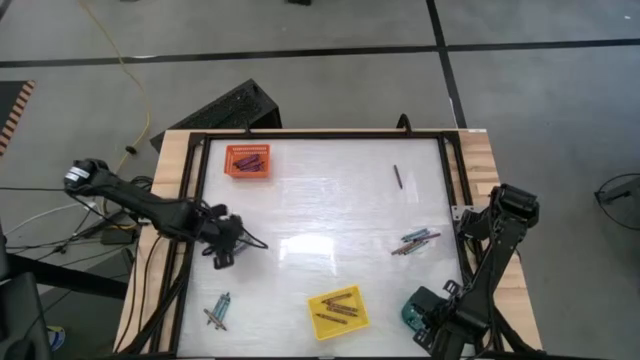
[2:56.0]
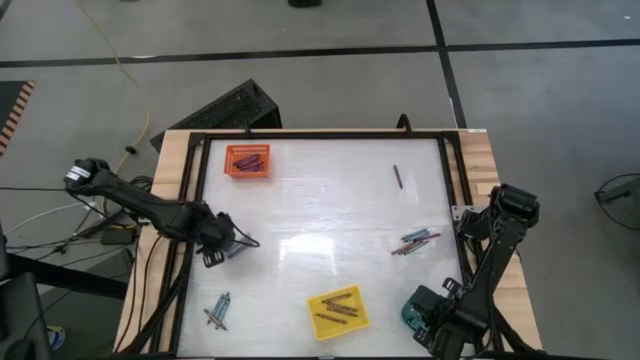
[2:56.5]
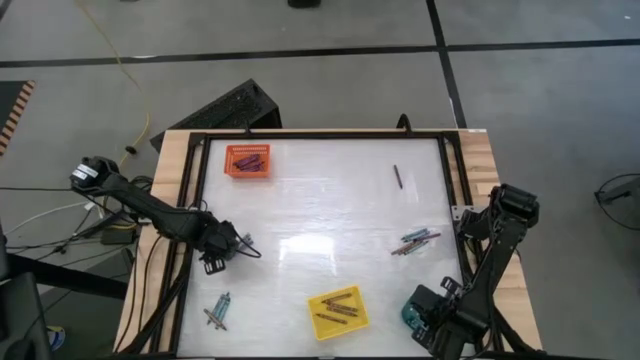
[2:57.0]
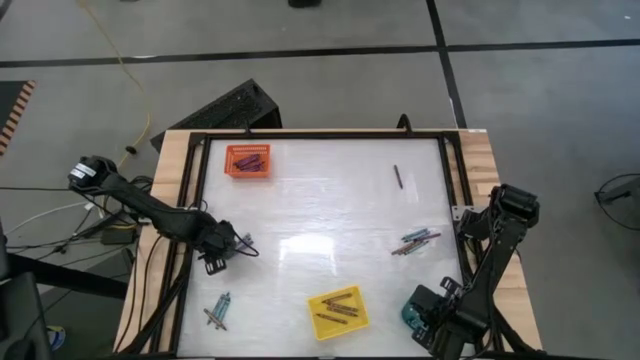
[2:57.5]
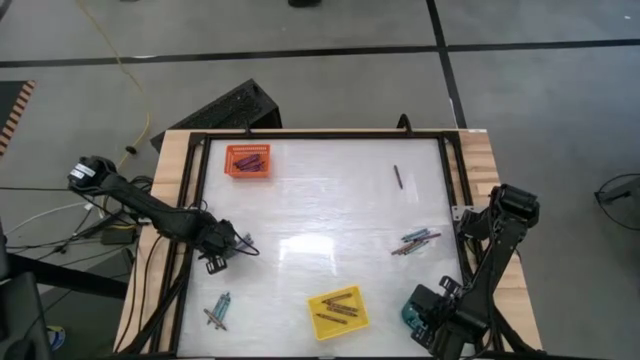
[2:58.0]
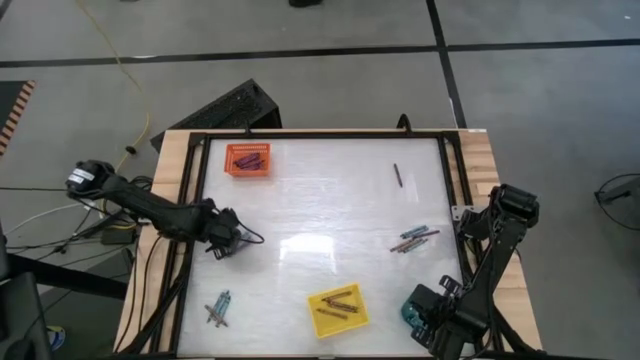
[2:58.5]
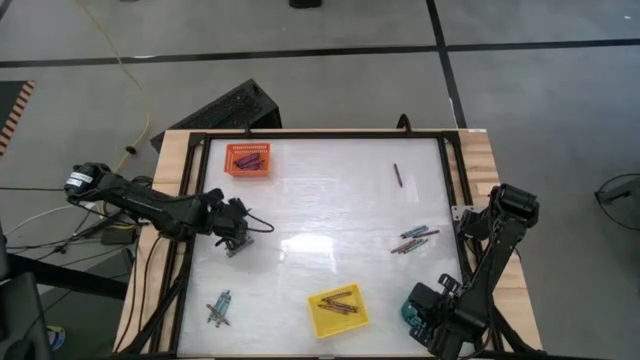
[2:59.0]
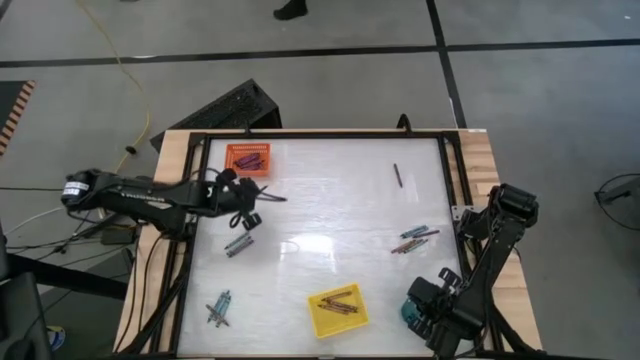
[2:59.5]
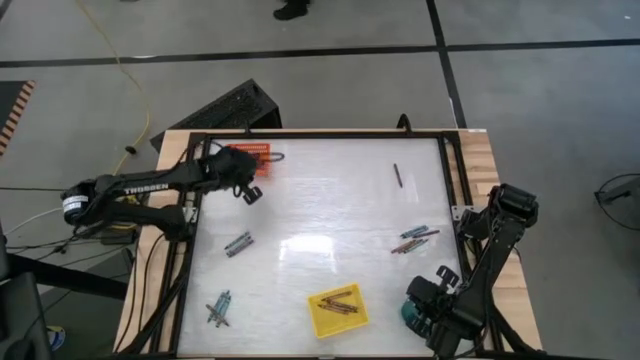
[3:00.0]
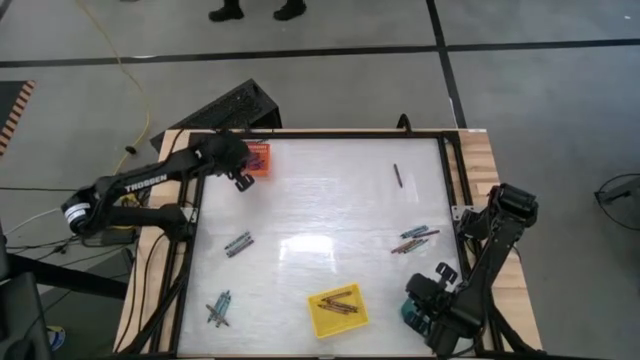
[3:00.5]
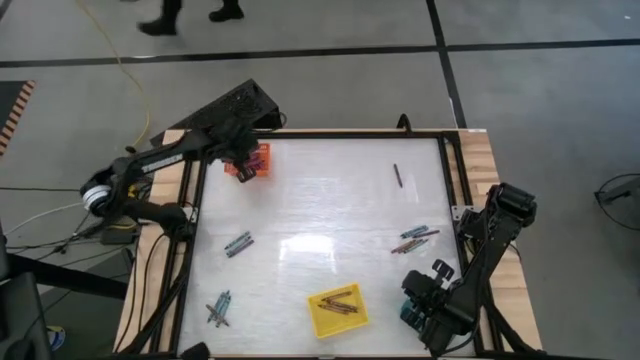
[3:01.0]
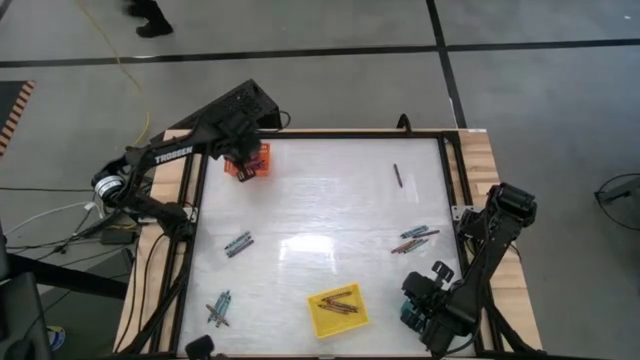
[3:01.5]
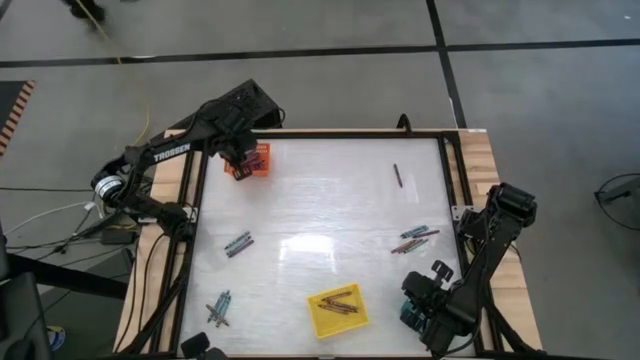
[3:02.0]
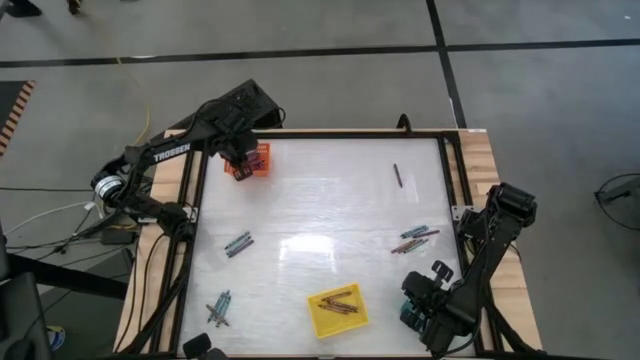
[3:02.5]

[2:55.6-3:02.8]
Task: Sort crayons
Put the purple crayon into the orange bin

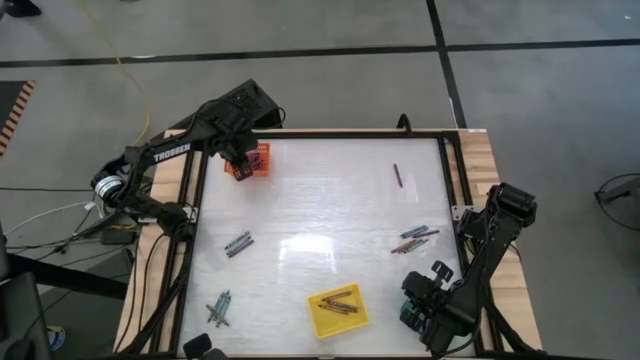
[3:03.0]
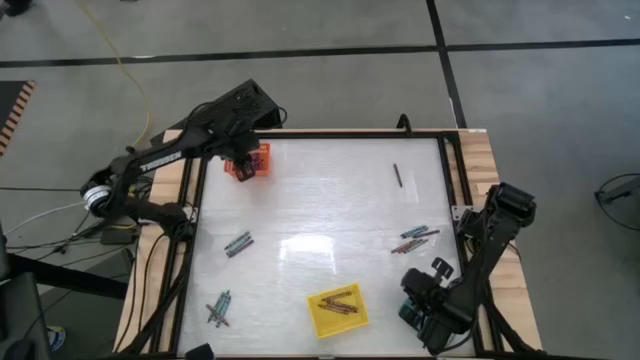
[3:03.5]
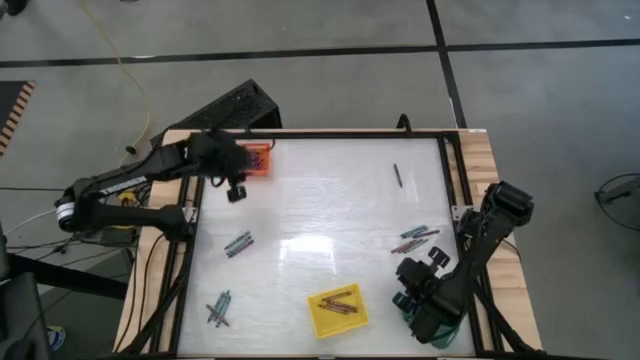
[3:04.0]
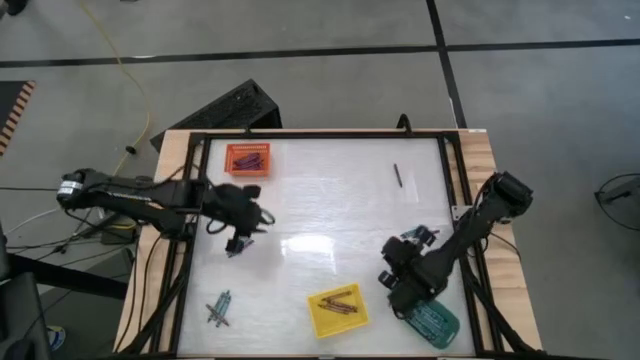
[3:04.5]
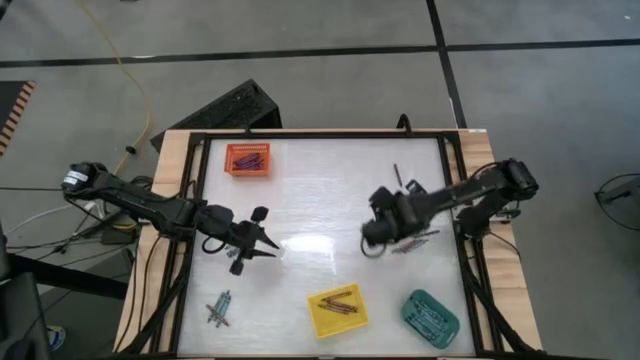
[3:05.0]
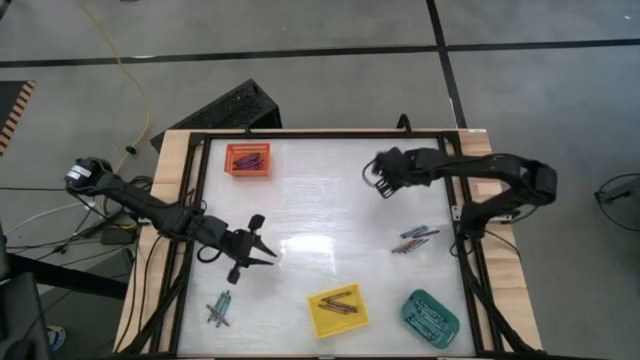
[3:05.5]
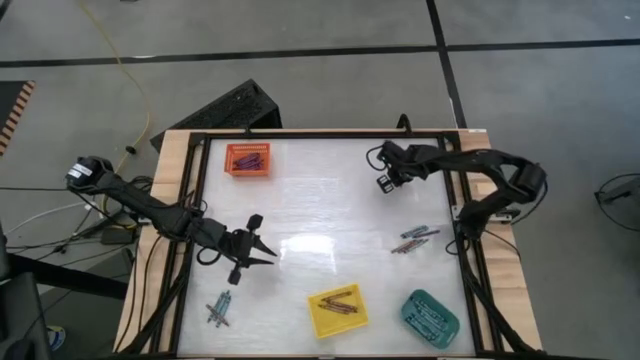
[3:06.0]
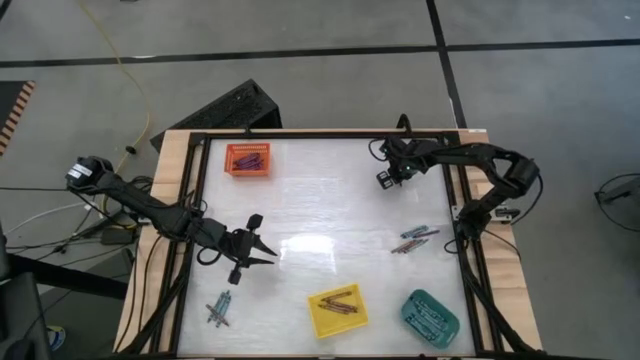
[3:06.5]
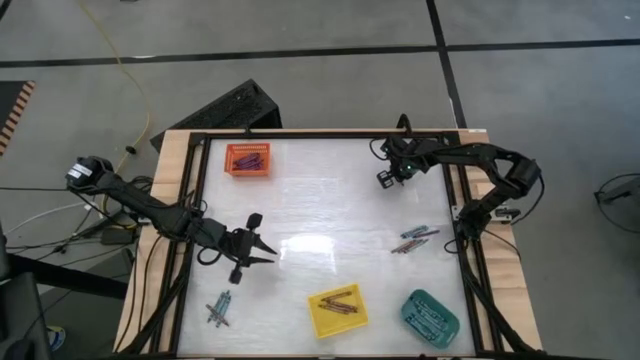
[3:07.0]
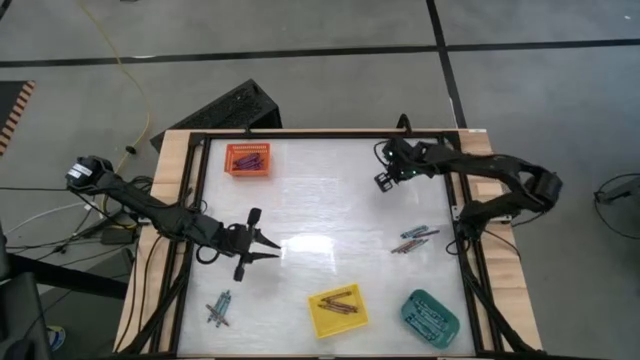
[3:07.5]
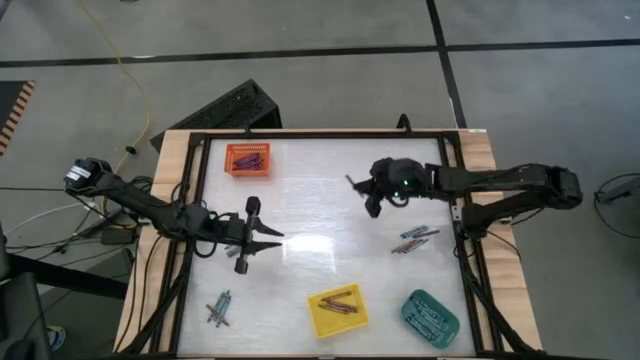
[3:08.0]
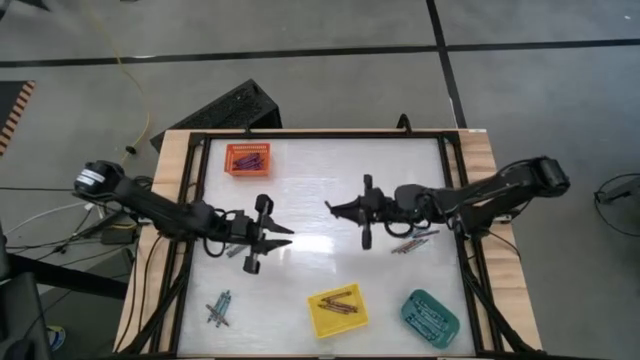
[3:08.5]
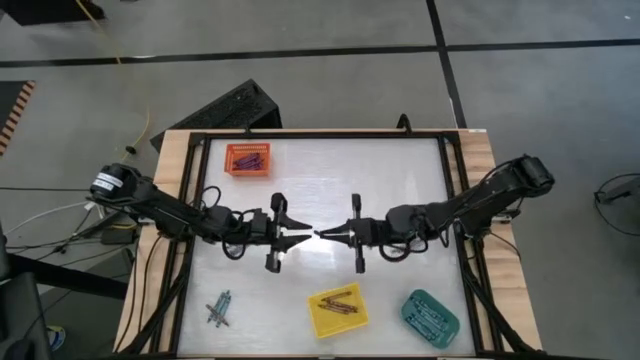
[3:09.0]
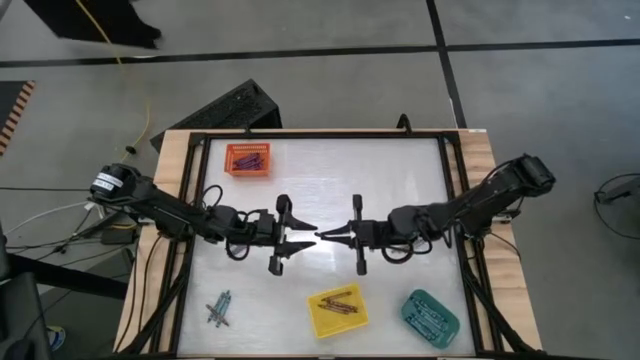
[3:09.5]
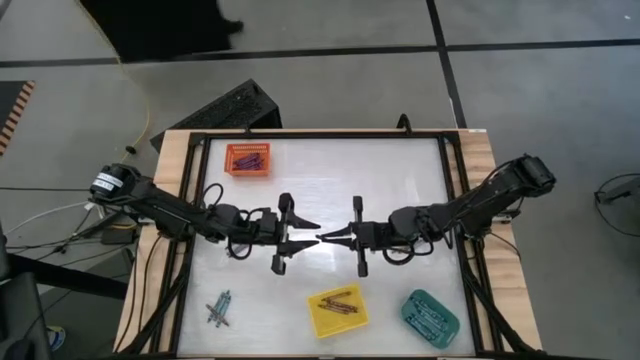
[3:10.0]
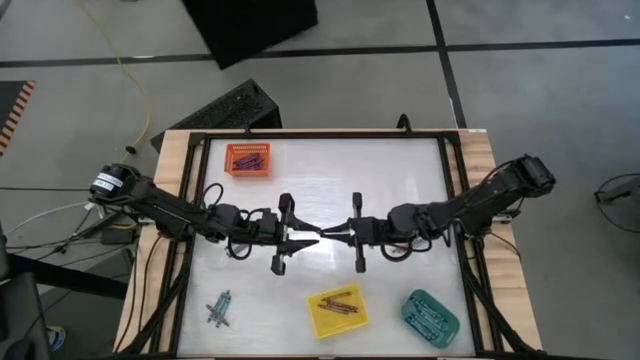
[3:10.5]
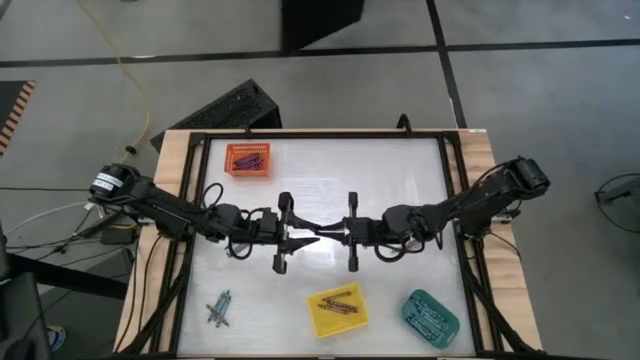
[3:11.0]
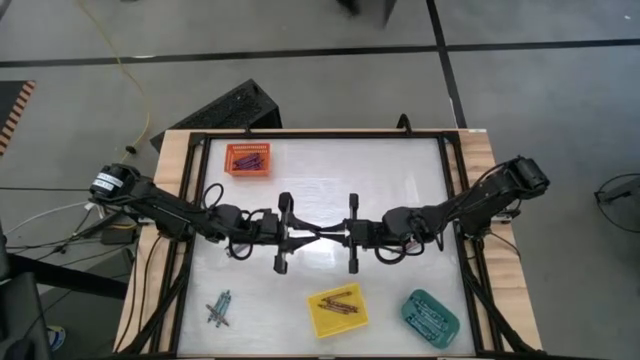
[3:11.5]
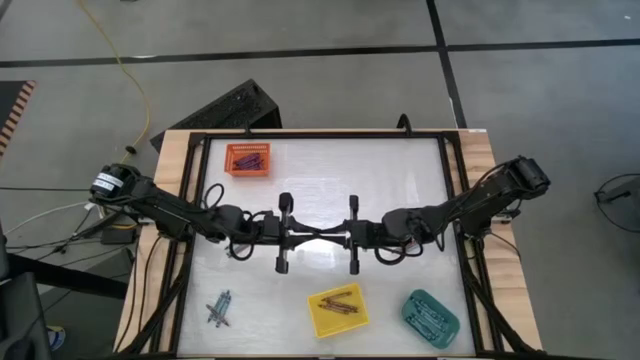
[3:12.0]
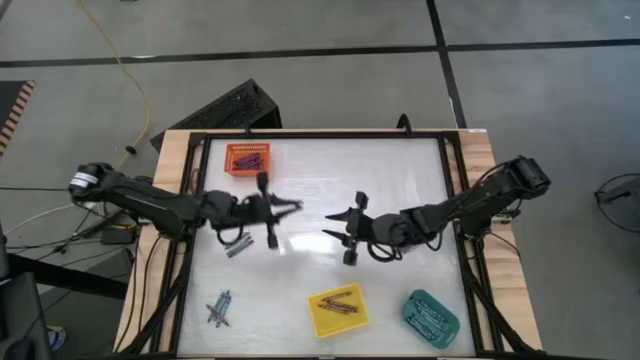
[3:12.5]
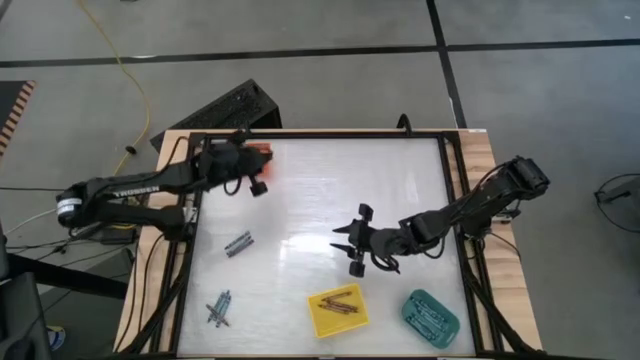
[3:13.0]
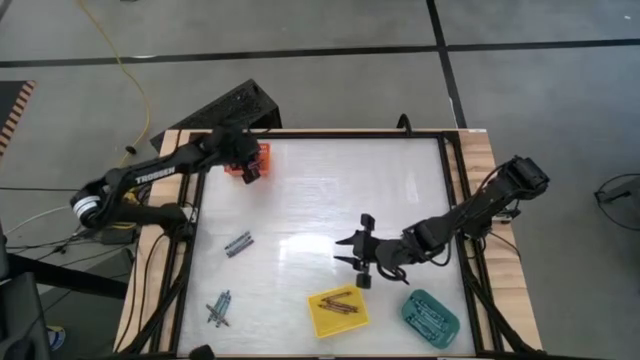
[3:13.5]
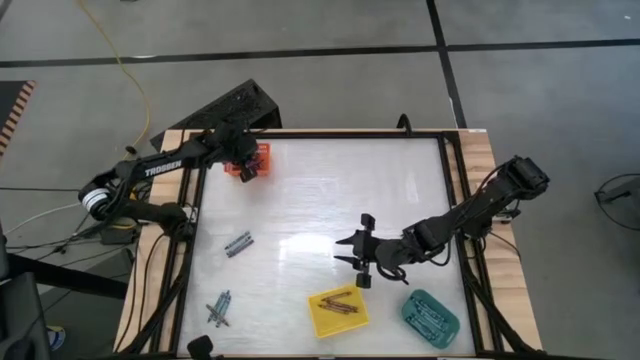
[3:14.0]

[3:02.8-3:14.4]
Put the purple crayon into the orange bin

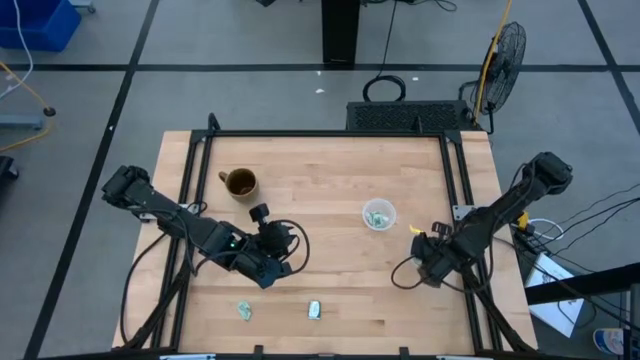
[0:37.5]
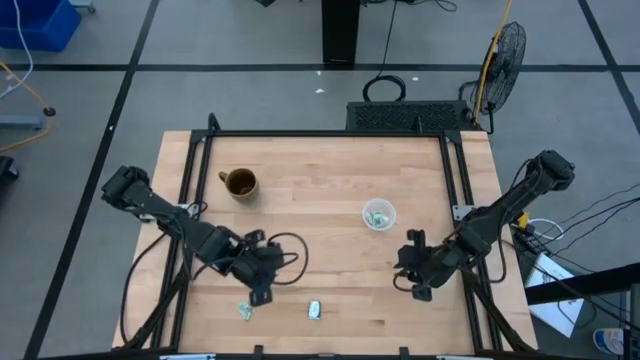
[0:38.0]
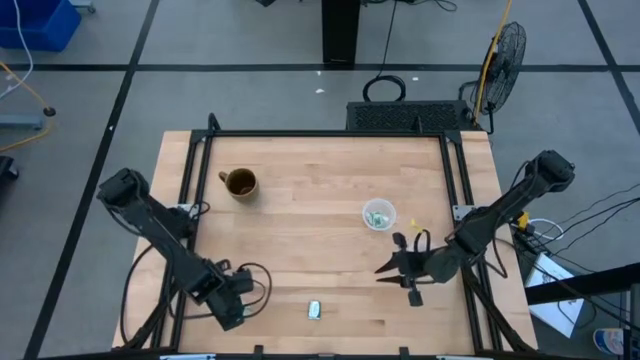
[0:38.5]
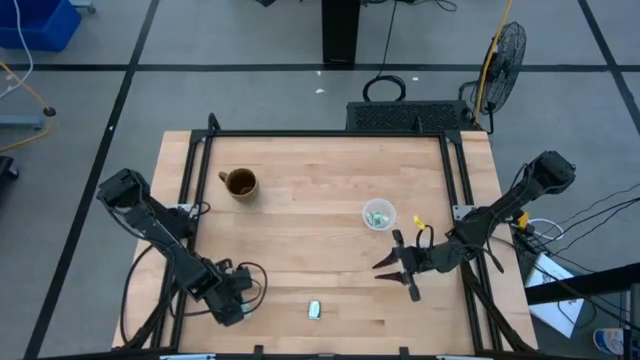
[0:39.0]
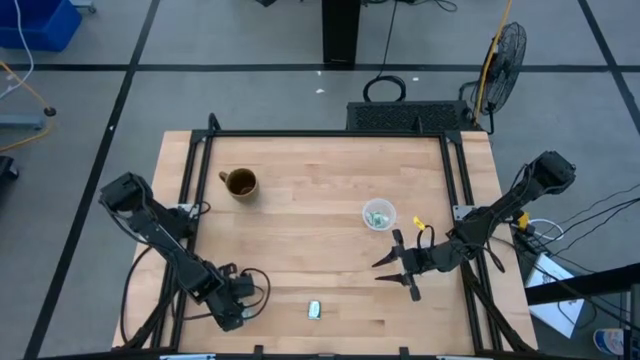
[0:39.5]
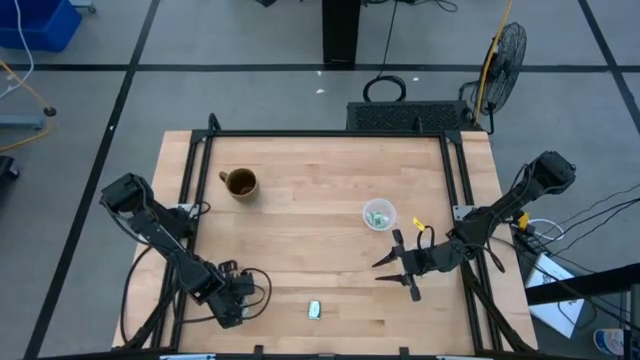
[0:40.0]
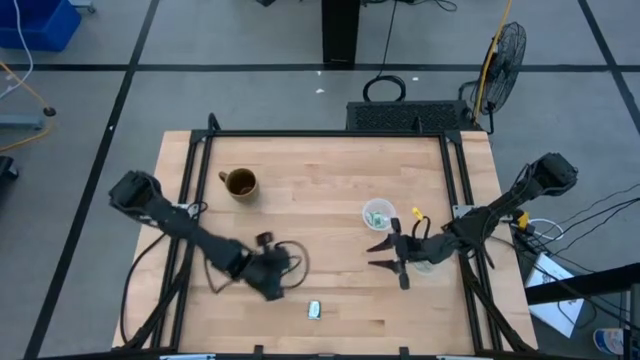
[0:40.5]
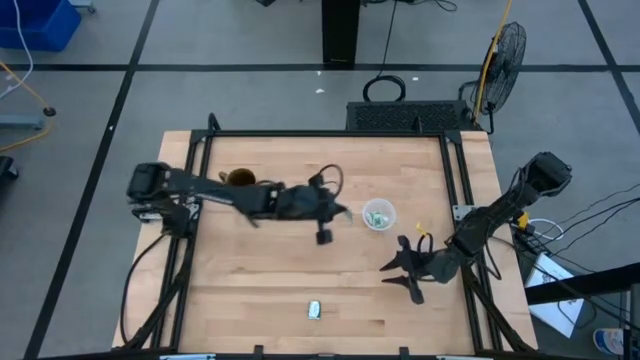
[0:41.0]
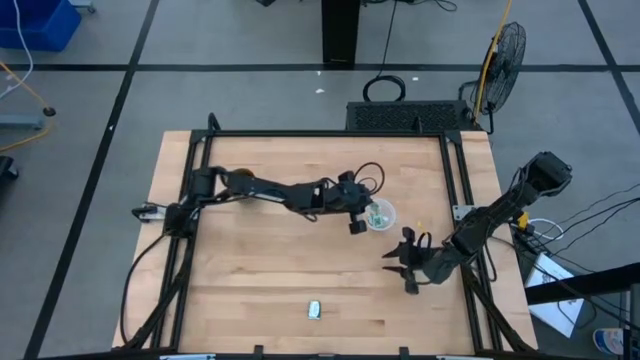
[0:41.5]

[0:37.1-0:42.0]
Task: Pick and place items into bin
Put the white stevia packet into the top transparent bin
